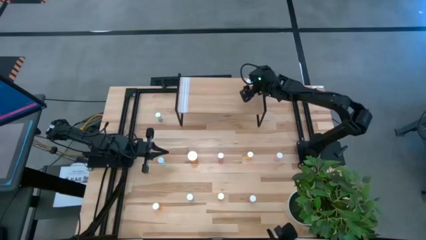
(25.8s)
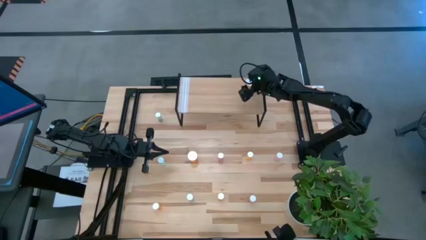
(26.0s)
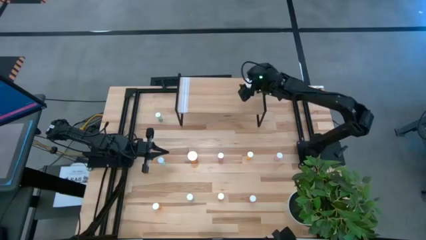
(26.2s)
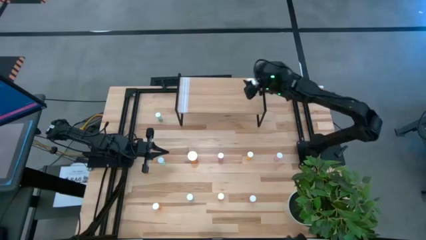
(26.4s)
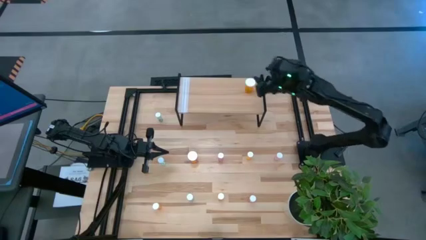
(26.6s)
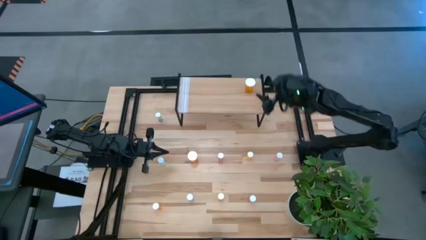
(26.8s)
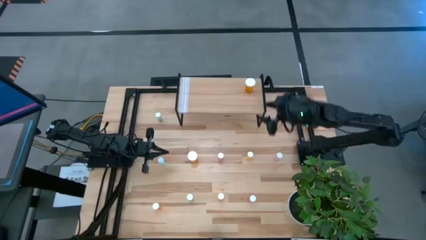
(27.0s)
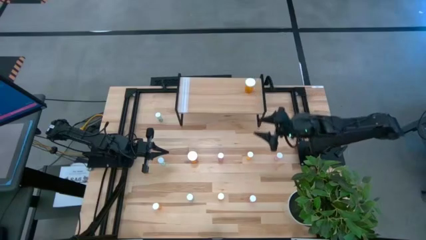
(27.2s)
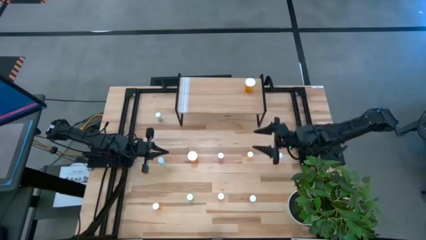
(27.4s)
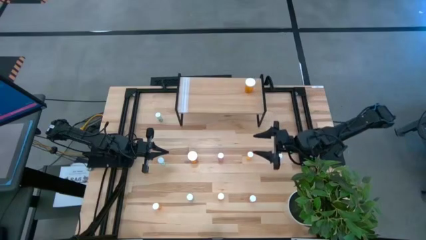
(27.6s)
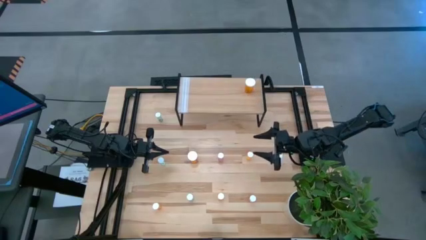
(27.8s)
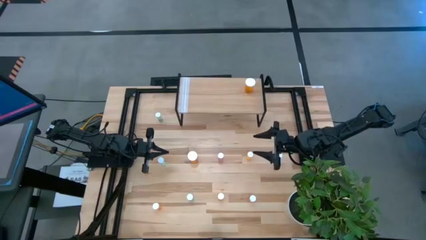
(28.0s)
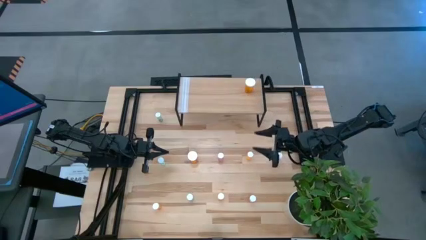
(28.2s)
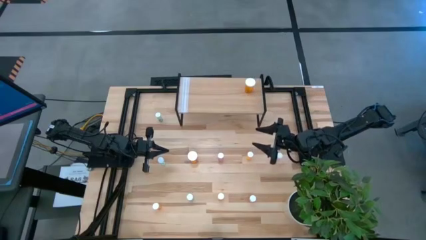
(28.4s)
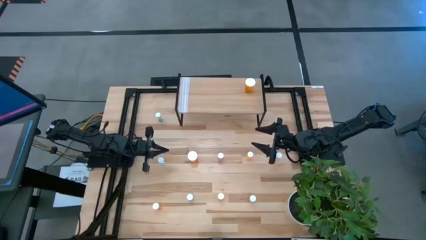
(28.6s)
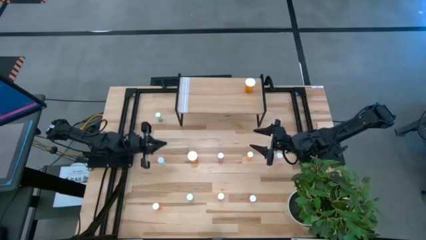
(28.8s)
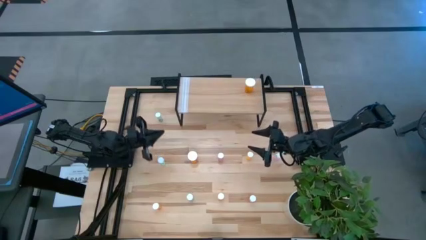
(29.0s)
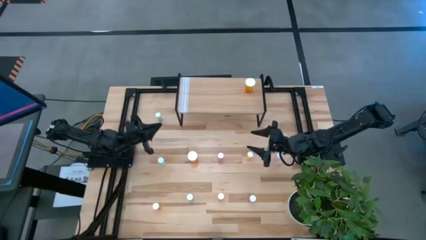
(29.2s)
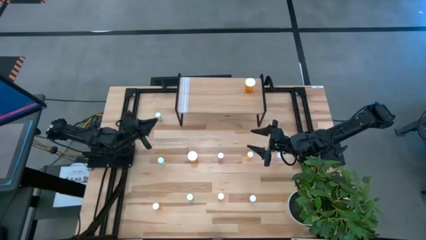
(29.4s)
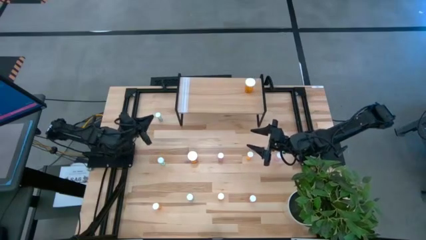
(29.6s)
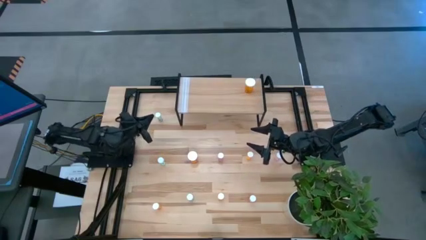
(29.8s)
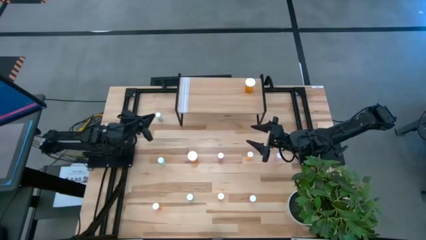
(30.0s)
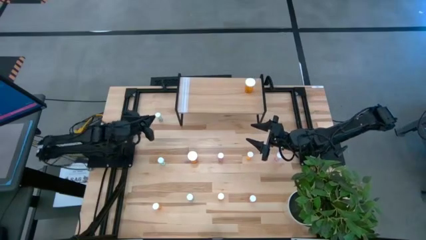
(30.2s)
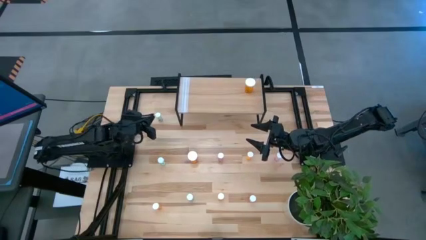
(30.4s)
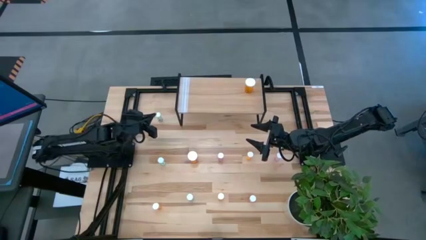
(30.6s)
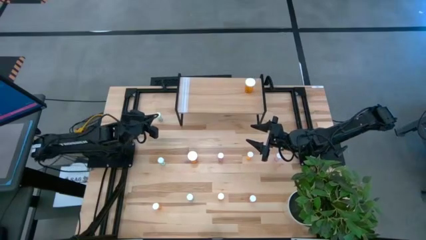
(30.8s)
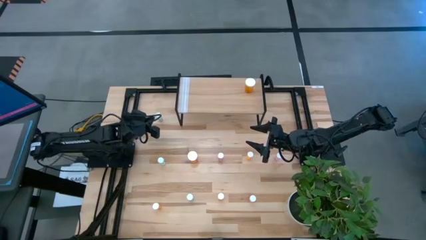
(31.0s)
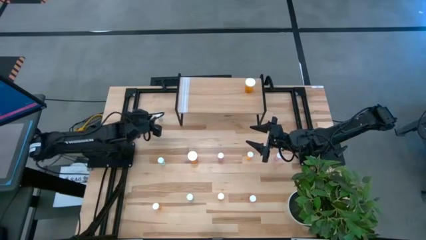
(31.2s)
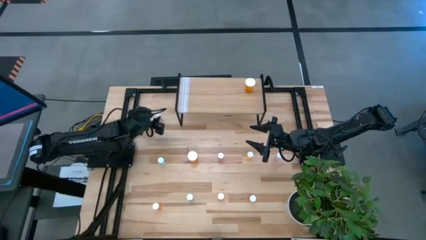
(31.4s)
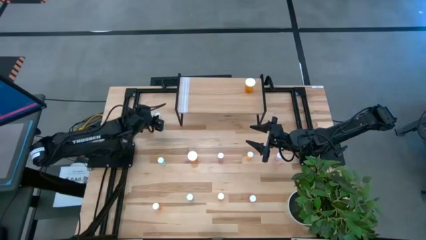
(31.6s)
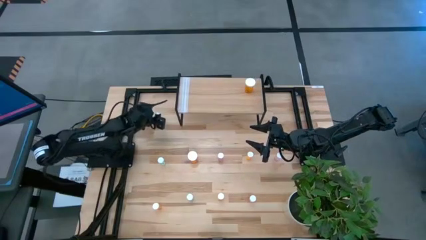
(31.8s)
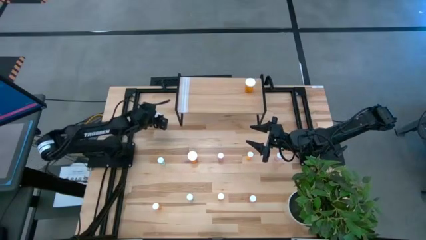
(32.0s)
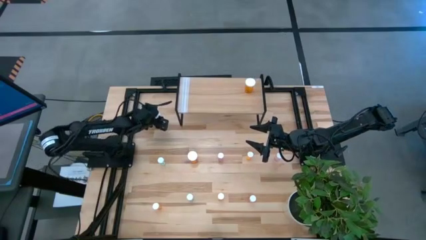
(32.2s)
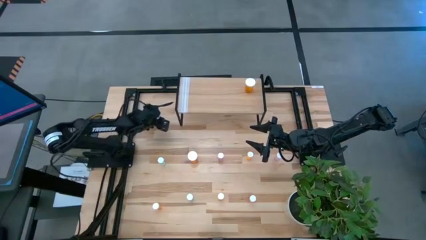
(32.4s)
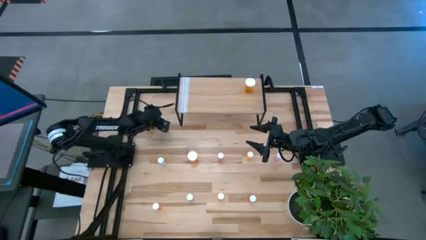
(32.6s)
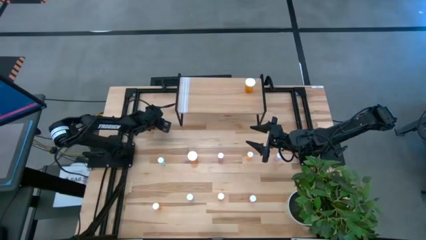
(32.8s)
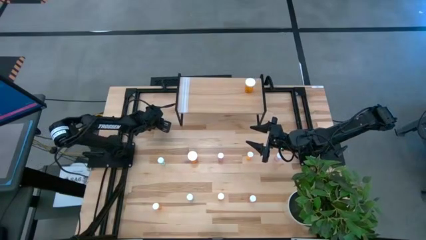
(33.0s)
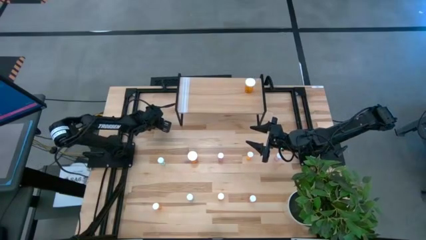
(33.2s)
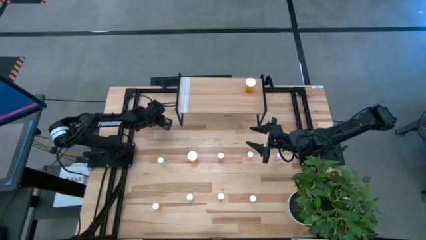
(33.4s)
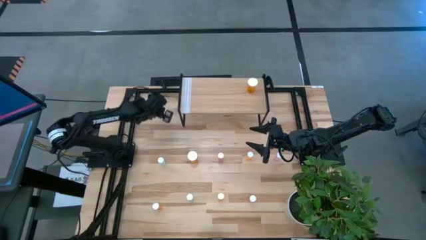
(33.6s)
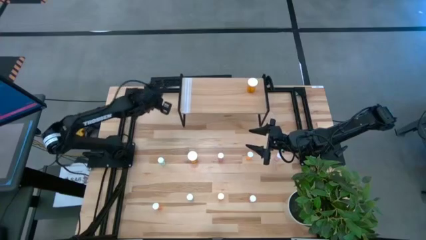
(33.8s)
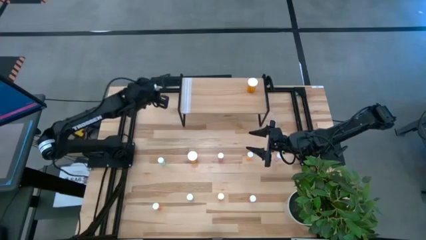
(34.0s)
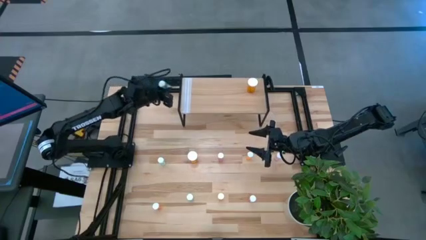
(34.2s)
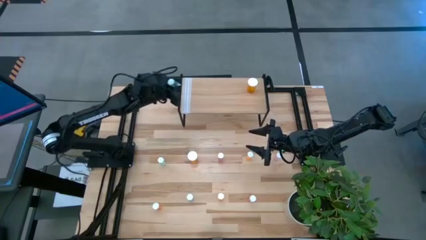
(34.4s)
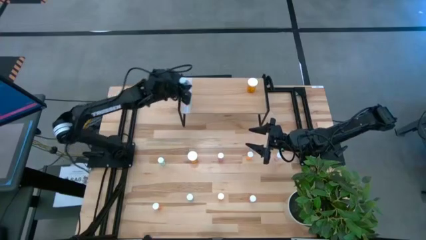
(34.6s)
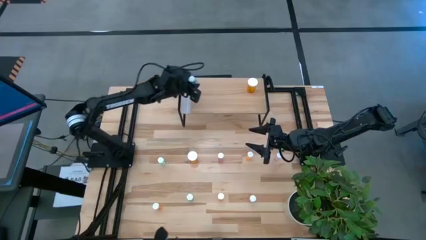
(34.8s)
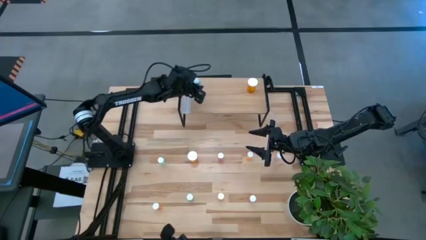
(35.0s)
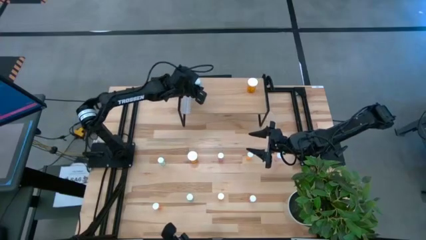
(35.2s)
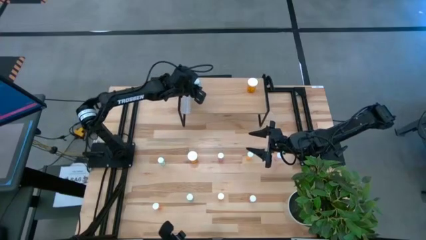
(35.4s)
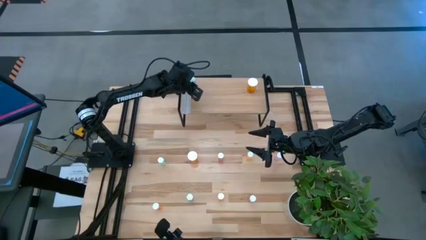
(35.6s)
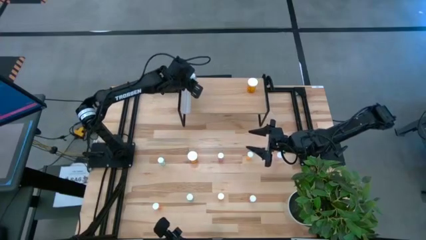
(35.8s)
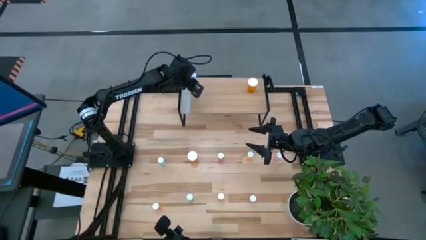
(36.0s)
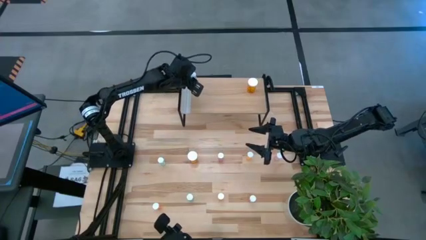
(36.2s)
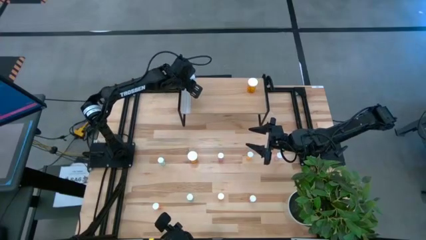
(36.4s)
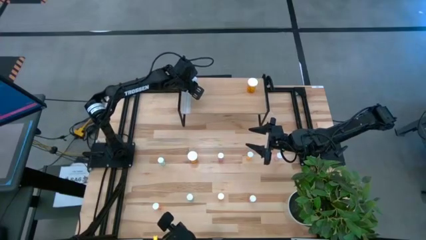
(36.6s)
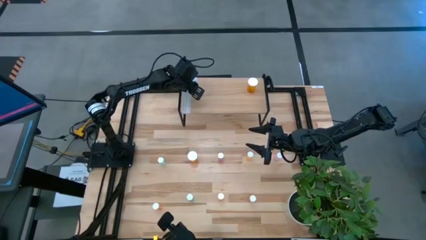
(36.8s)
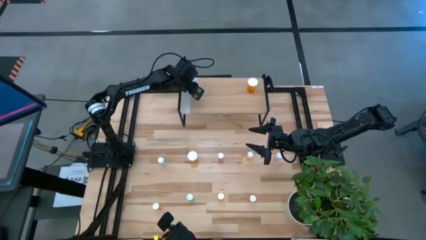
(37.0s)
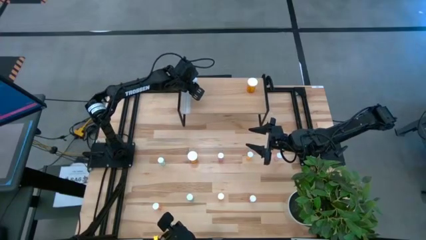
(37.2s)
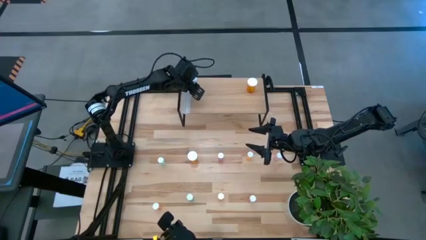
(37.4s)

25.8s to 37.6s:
Task: Pick and place medicine bottles onto shelf by color
Put the top left blue pill bottle on the shelf
